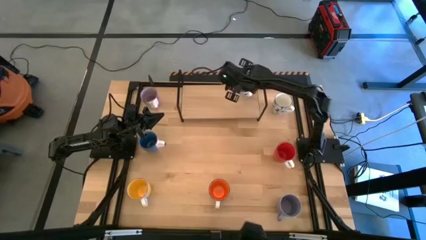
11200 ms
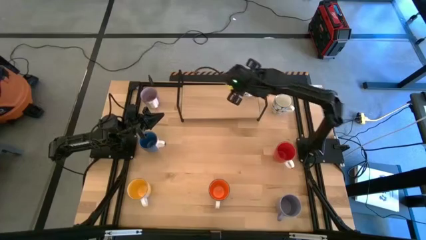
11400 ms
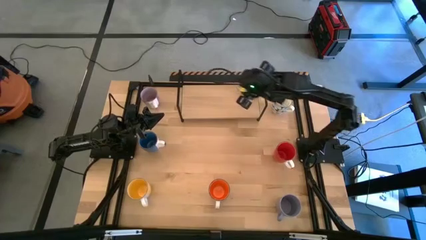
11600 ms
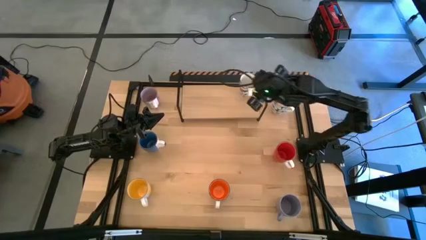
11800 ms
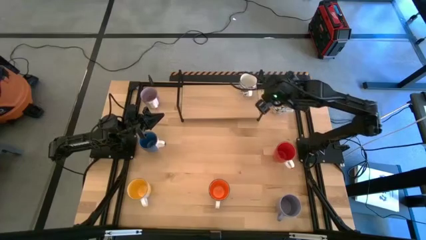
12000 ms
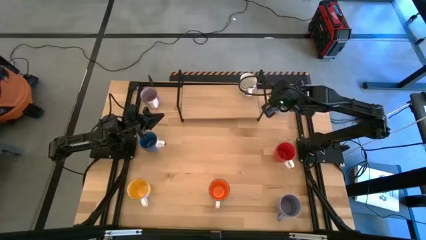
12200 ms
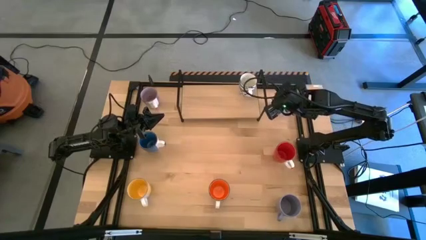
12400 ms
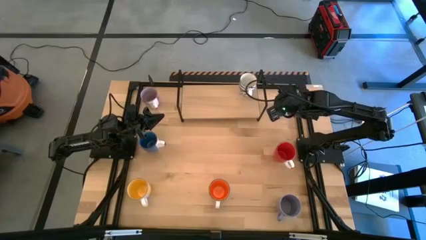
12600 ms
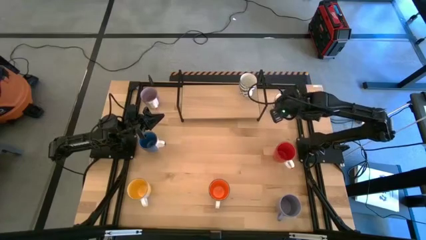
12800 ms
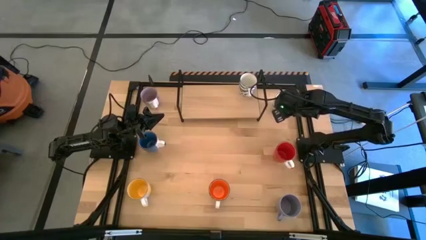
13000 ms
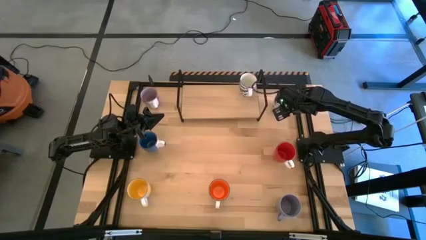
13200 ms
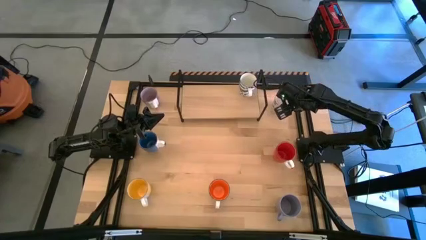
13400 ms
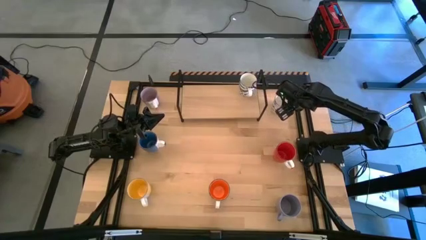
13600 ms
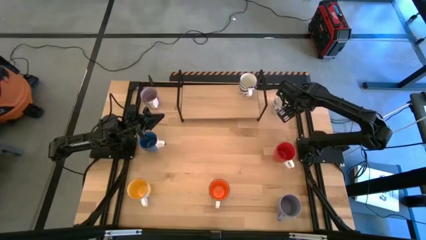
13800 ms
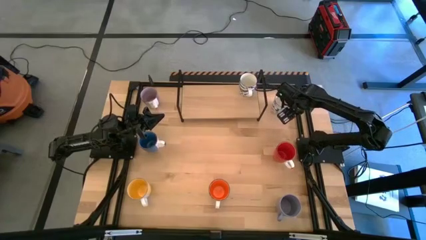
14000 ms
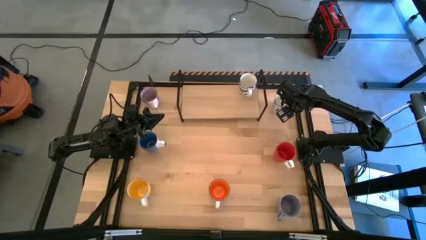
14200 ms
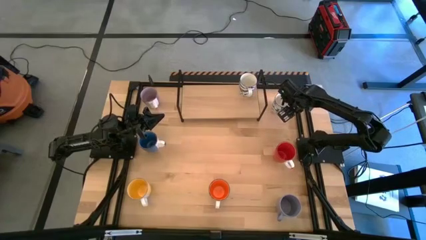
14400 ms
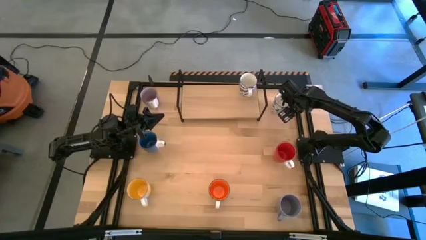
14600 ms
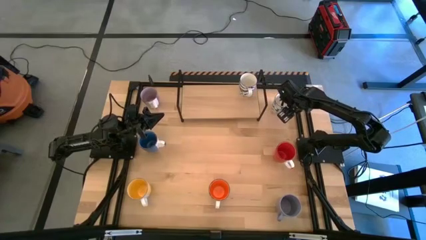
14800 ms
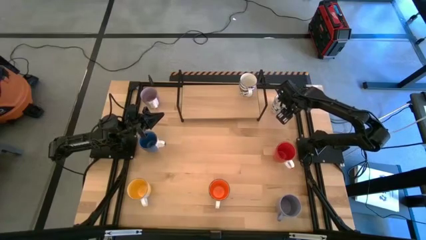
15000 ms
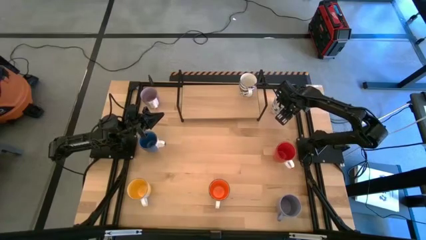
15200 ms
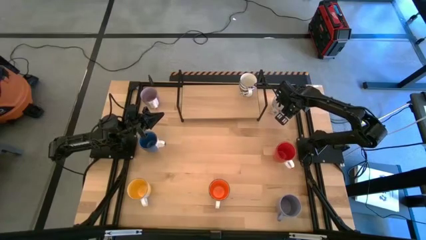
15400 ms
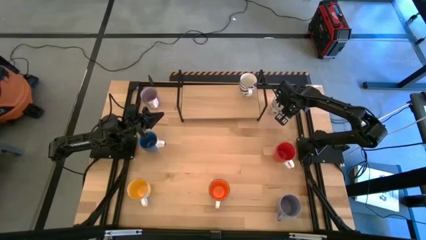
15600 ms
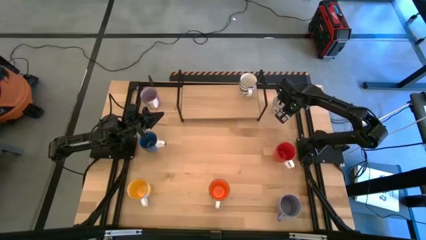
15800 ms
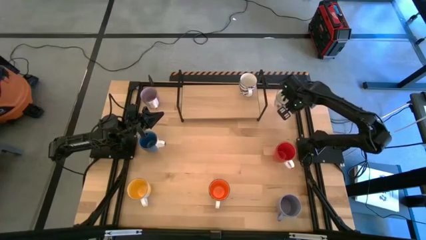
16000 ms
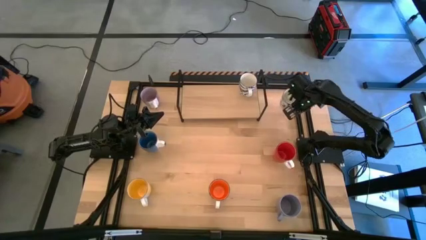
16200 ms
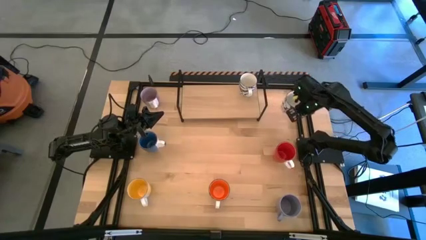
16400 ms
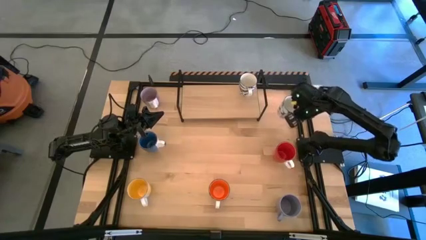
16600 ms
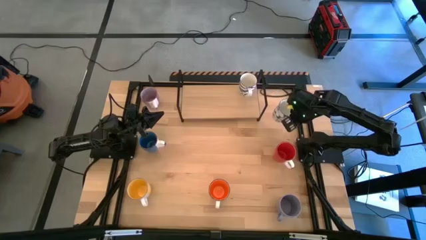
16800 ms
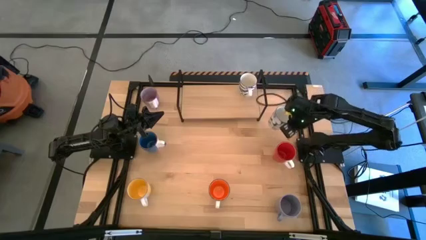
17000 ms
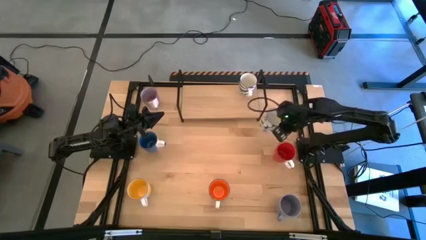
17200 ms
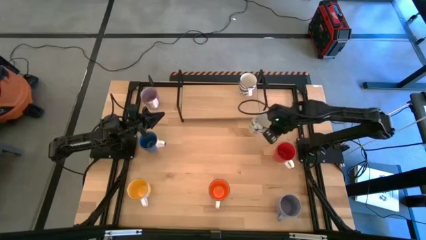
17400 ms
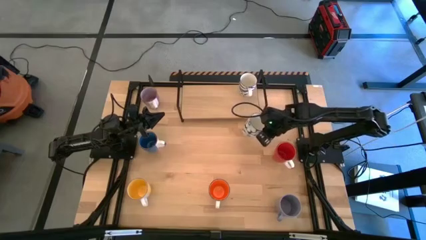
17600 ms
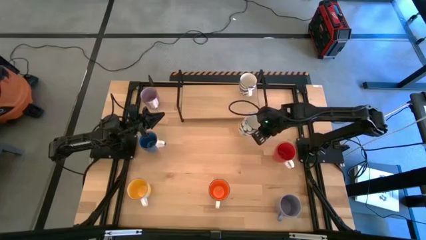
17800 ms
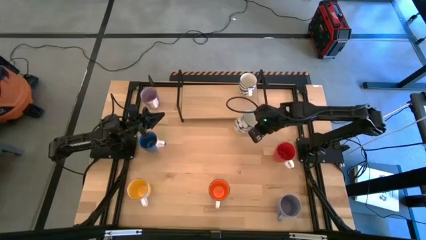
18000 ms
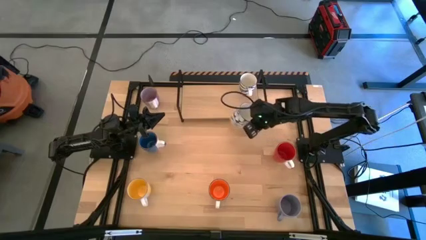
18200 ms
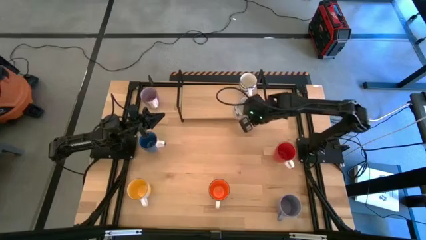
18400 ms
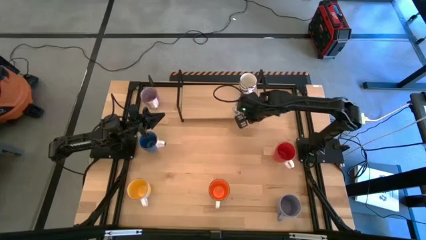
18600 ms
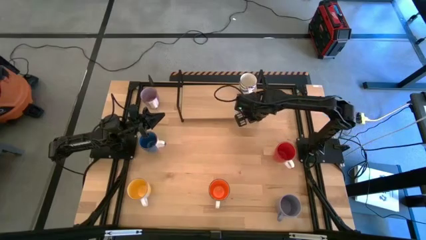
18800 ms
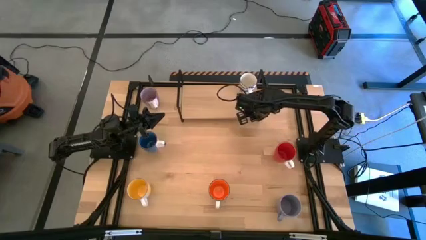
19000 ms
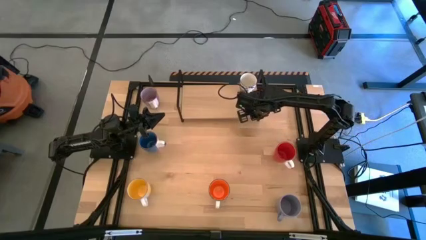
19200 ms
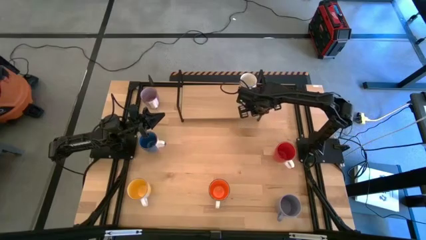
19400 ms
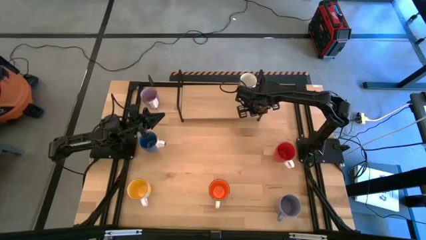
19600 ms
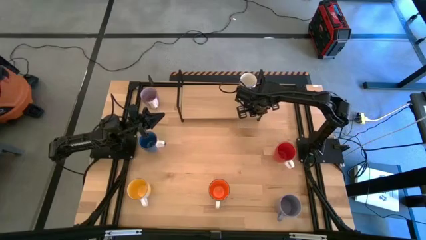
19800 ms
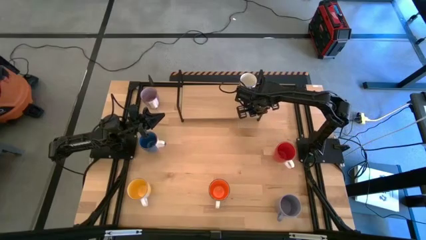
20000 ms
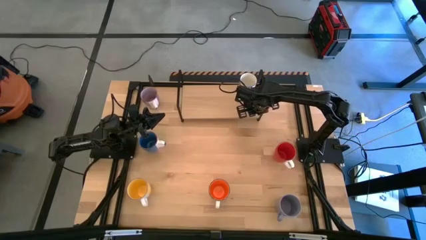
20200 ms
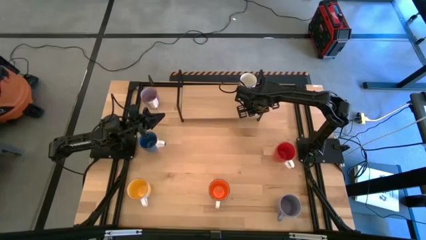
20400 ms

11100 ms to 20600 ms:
Task: Place coffee mugs
Put the blue patterned mug on the shelf aligned with the other blue patterned mug

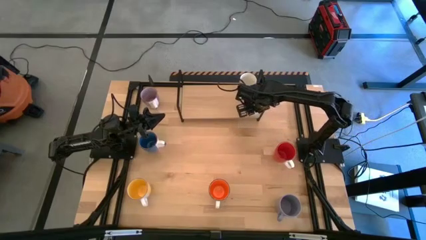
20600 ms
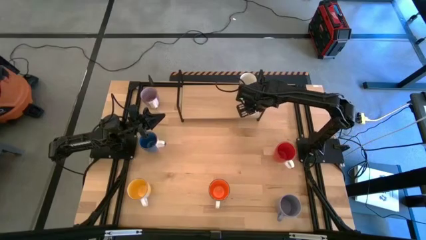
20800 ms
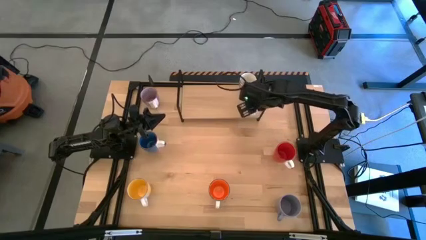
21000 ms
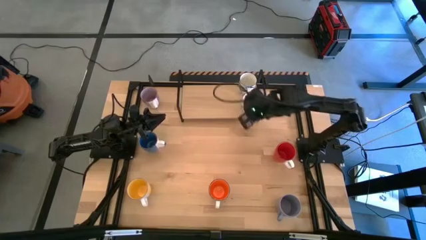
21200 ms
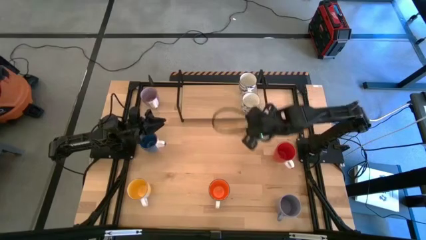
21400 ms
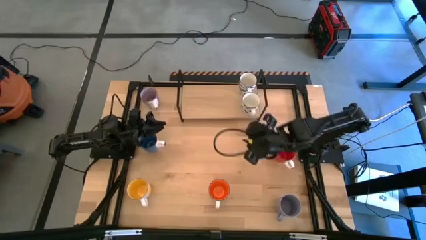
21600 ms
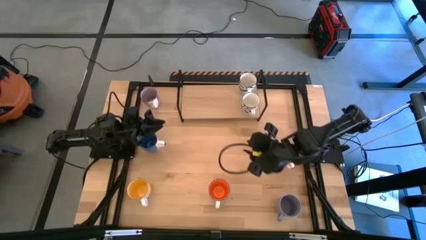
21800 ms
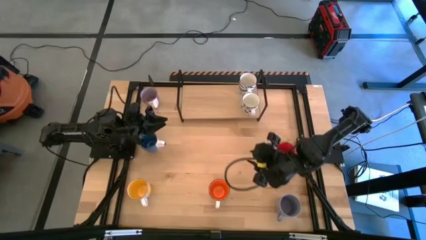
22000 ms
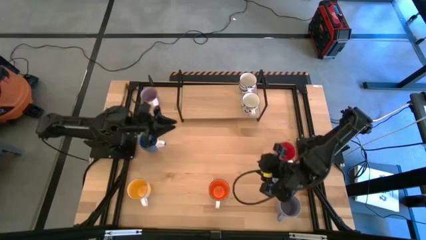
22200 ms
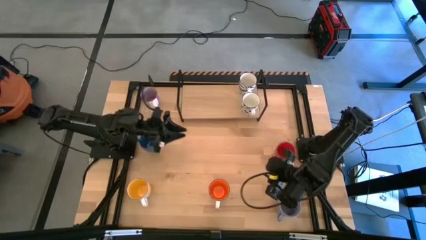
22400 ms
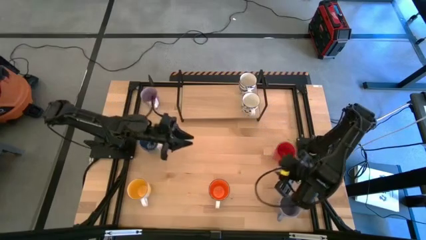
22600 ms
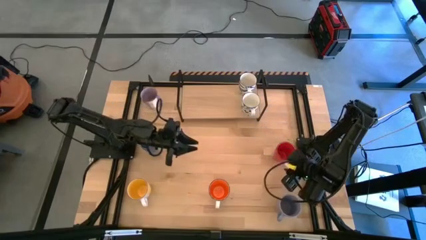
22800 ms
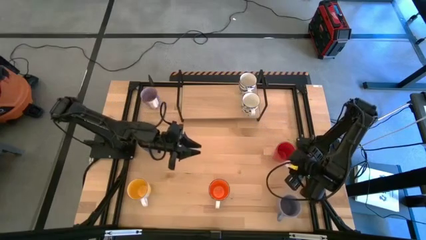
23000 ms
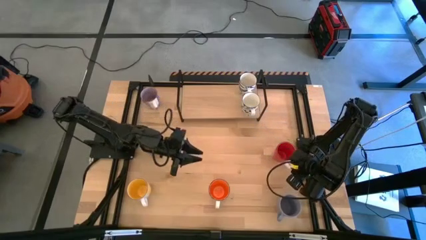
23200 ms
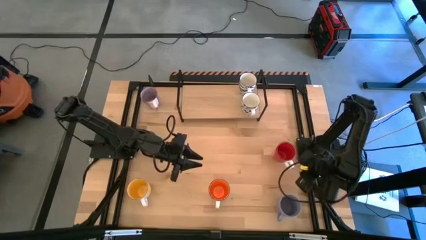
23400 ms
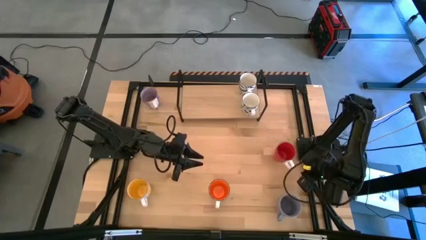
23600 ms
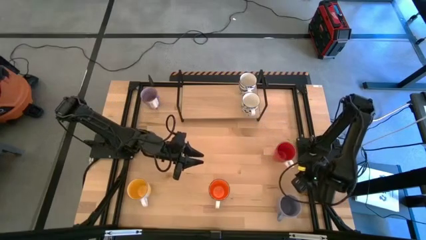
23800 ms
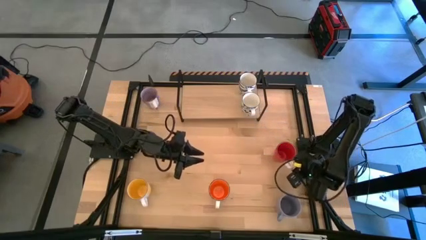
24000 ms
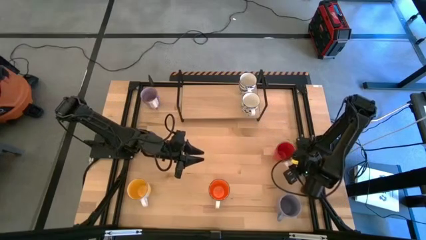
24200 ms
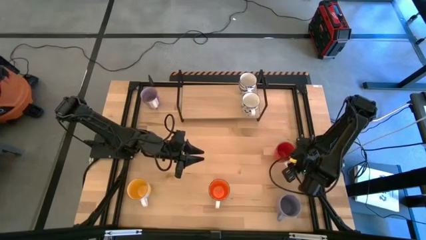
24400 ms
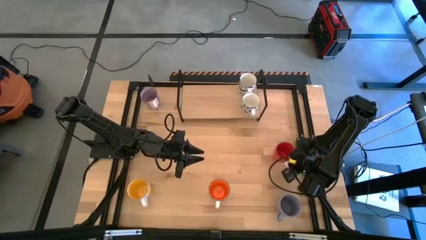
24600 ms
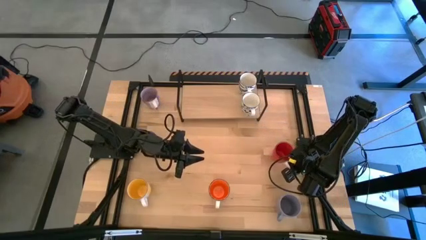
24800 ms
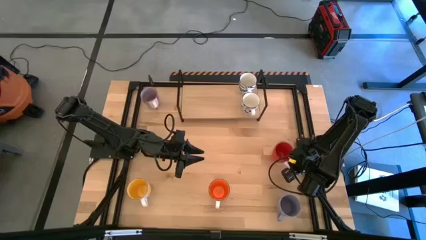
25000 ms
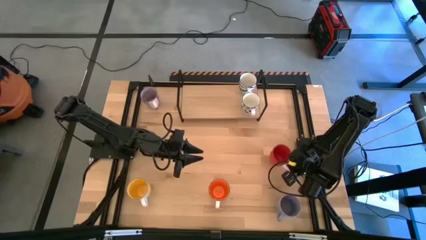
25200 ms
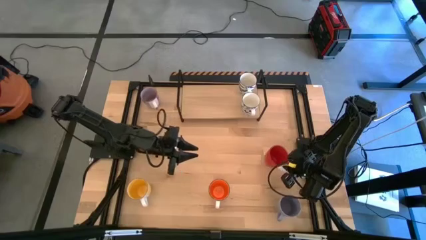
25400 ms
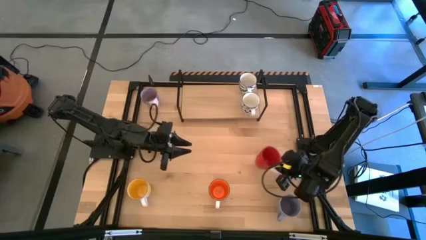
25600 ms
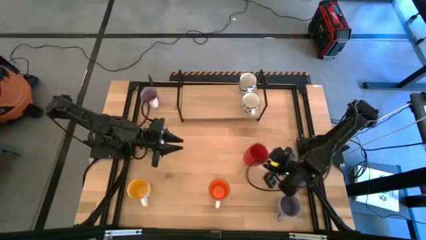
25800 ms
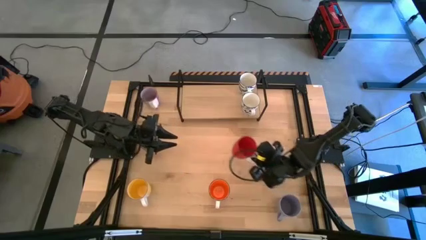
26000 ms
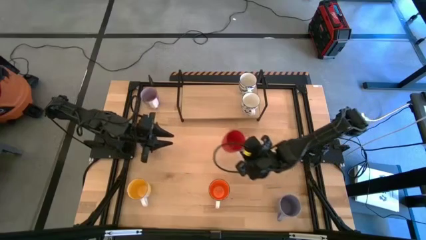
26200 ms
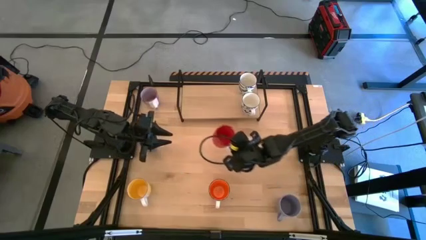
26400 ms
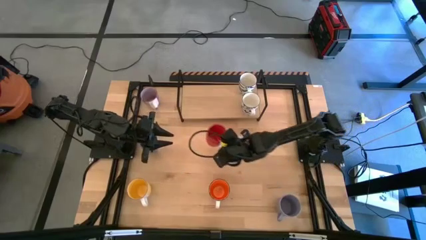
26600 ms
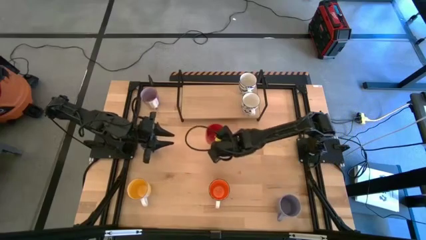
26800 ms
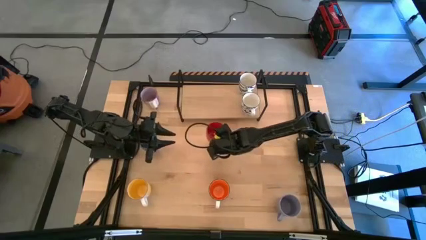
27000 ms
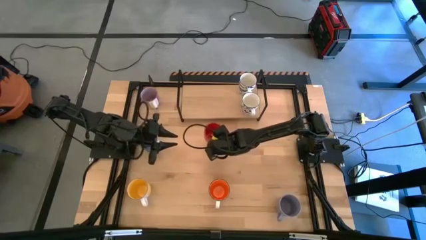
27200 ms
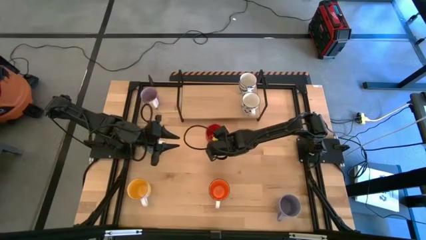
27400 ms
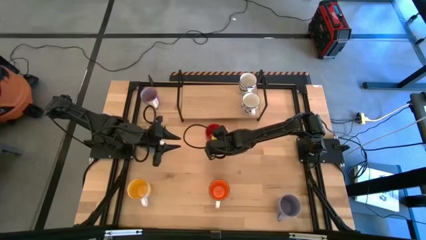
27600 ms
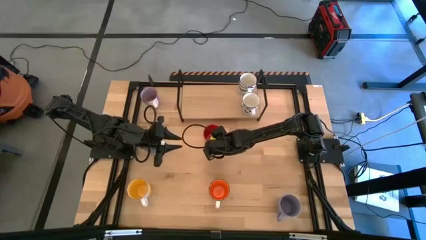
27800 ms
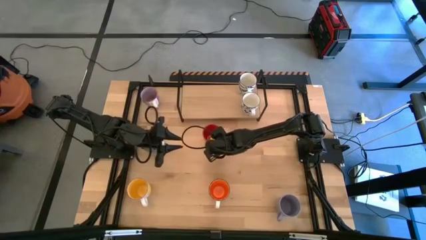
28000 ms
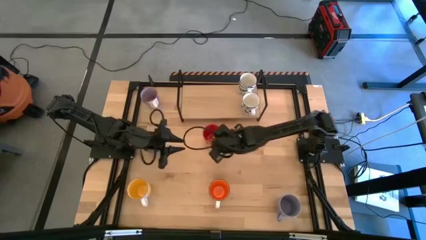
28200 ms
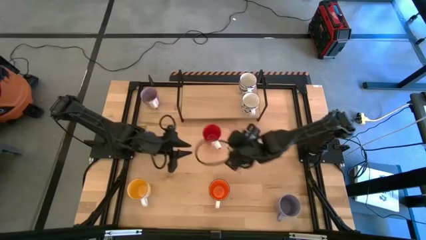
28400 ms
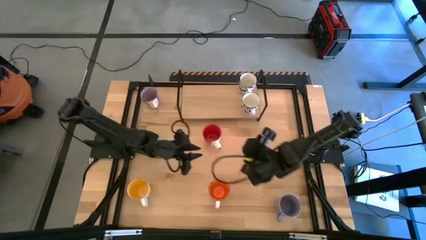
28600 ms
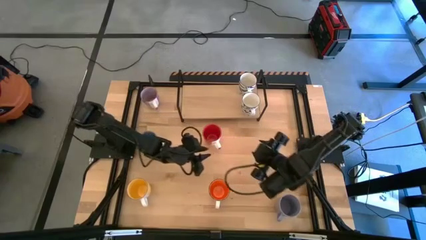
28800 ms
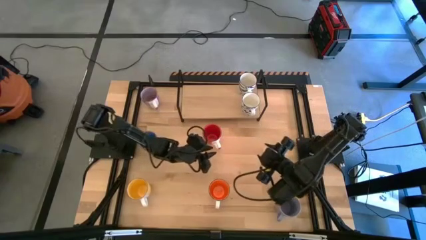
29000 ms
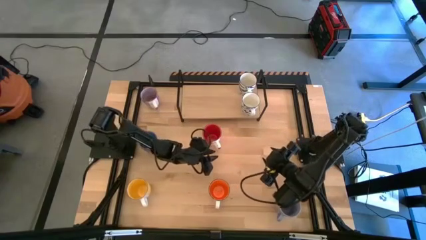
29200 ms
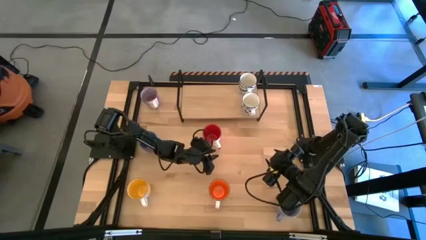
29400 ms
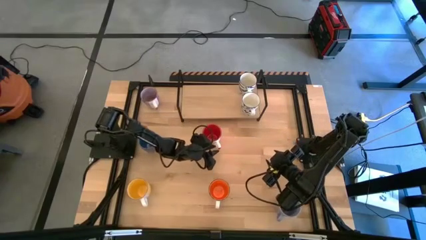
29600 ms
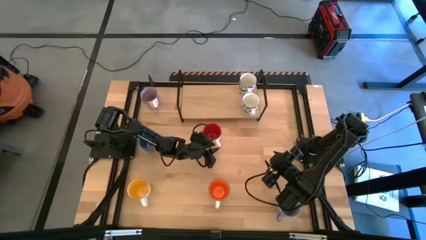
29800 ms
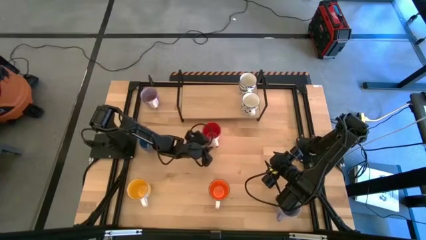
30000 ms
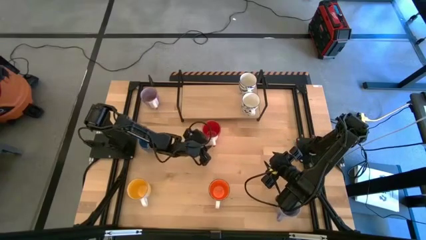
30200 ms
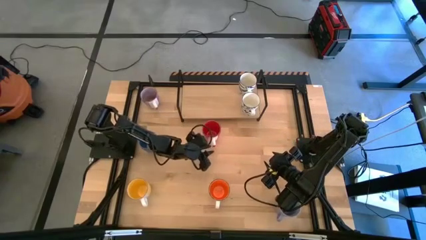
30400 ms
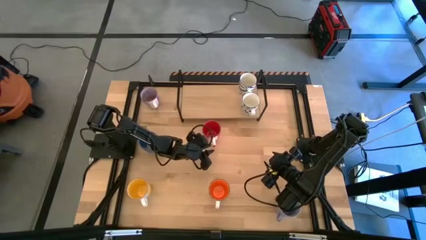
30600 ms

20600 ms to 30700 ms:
Put the red mug on the shelf
